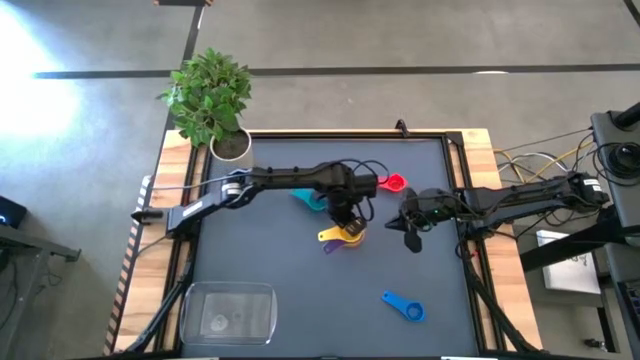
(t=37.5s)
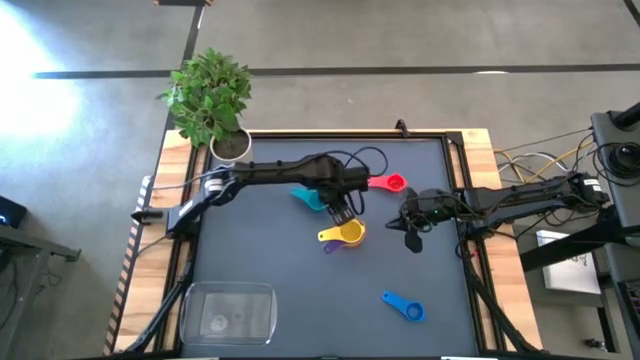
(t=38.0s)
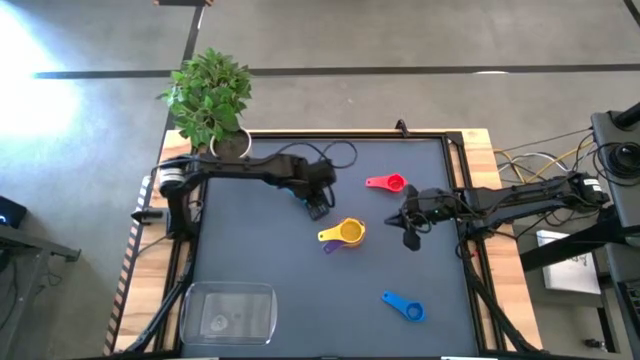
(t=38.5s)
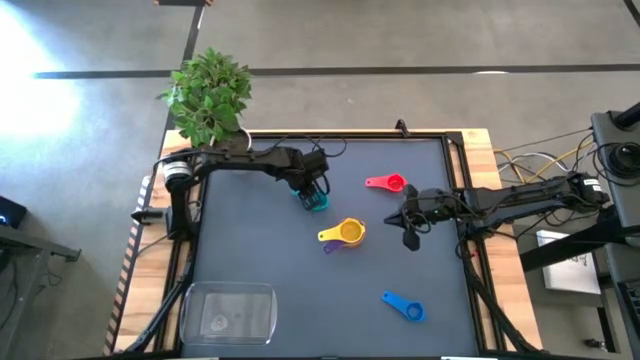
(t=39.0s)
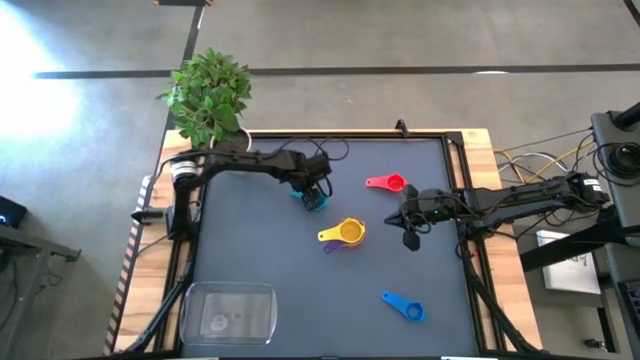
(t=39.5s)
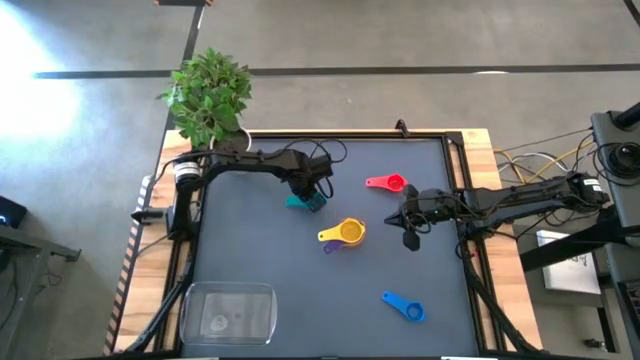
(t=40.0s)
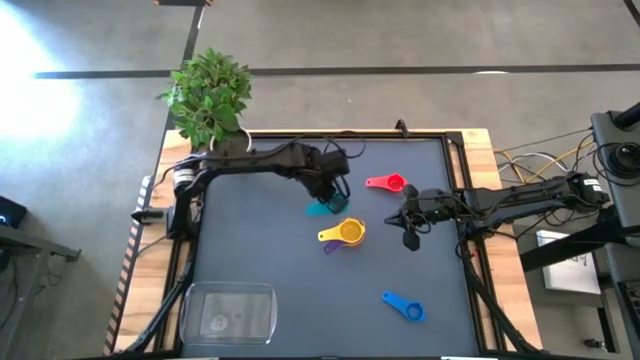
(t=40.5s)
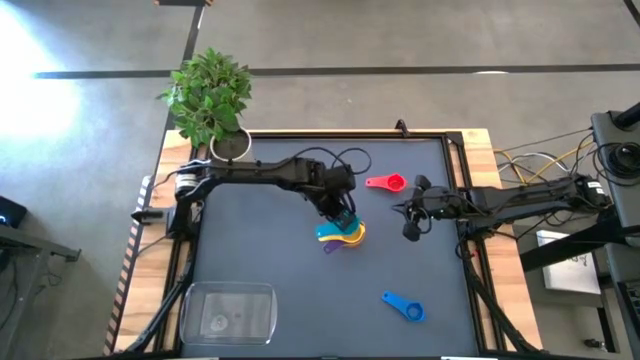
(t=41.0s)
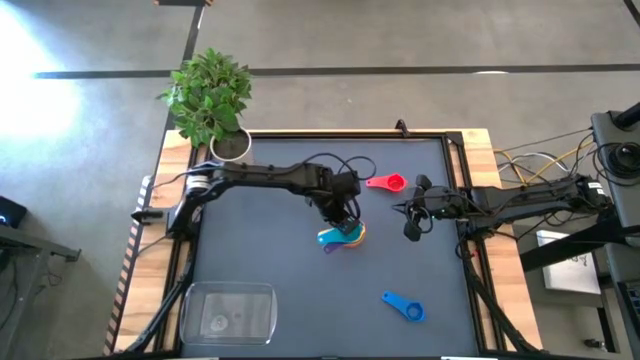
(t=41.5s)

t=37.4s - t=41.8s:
Task: Nest measuring cups in basket
Stack the light blue measuring cup into the yellow measuring cup

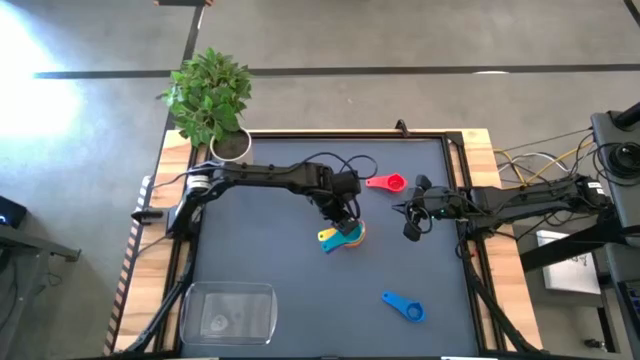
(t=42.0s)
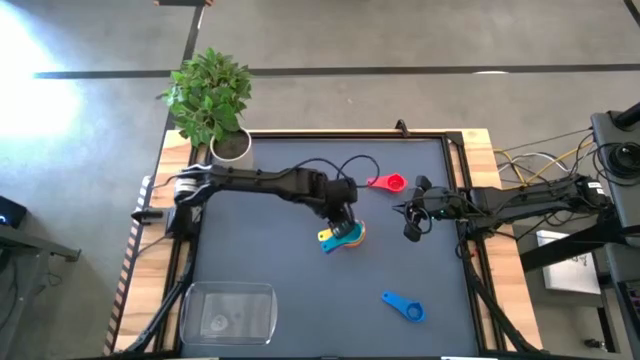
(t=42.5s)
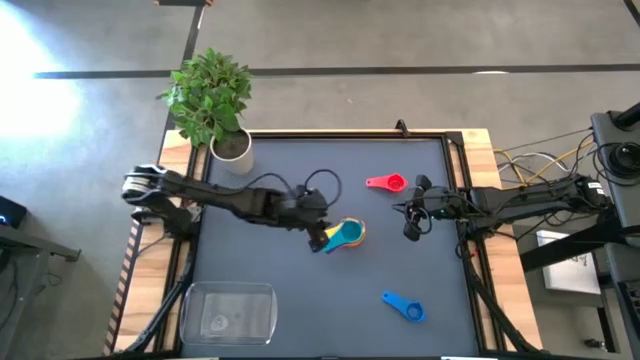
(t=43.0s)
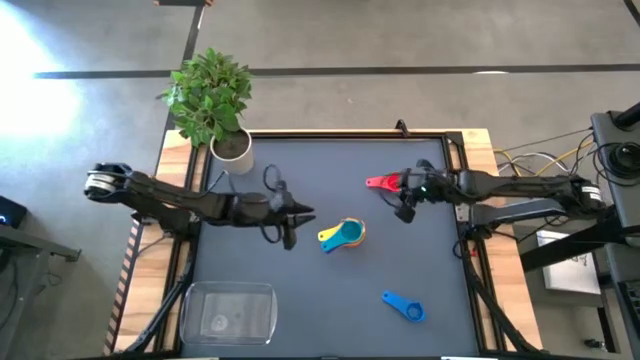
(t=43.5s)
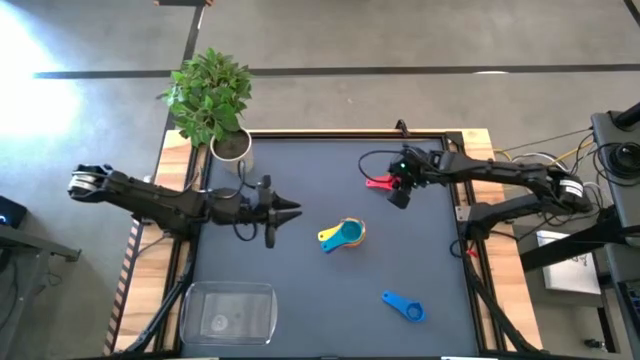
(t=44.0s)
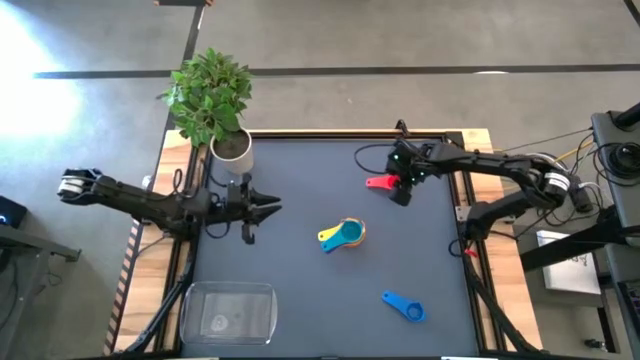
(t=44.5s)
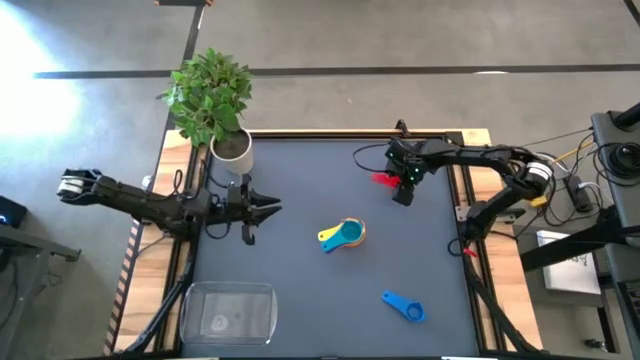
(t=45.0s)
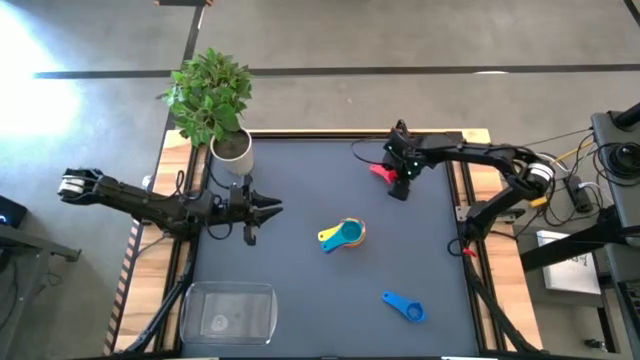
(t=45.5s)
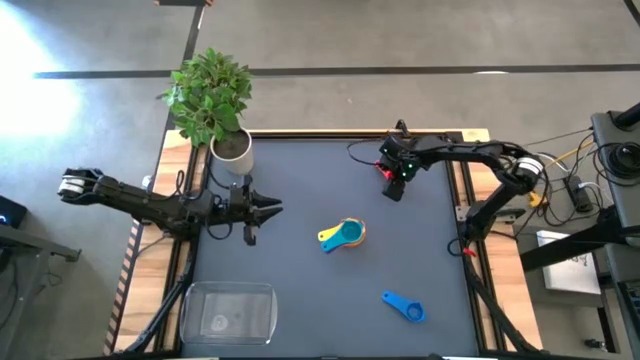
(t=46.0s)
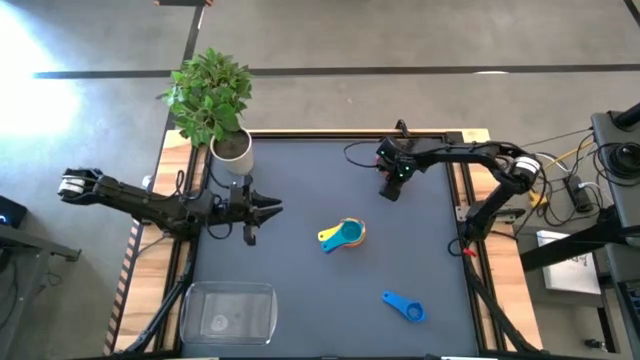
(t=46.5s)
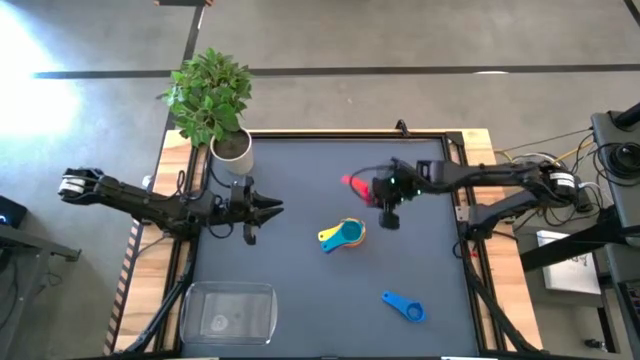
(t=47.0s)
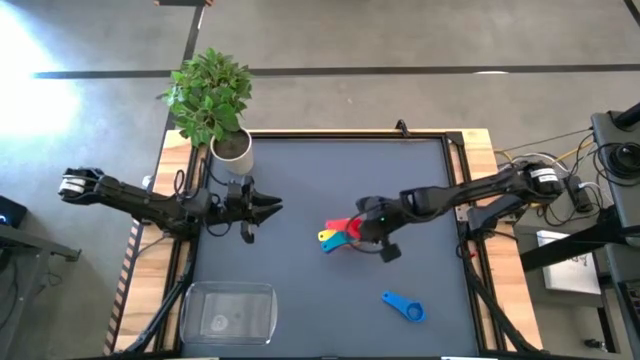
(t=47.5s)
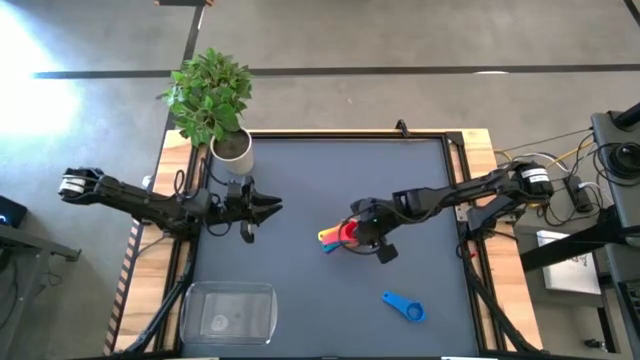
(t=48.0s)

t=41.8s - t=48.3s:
Stack the red measuring cup into the light blue measuring cup

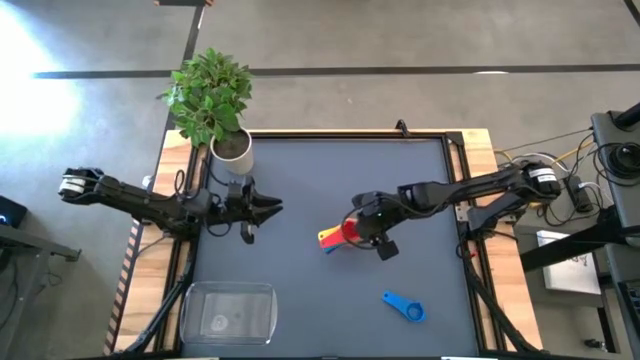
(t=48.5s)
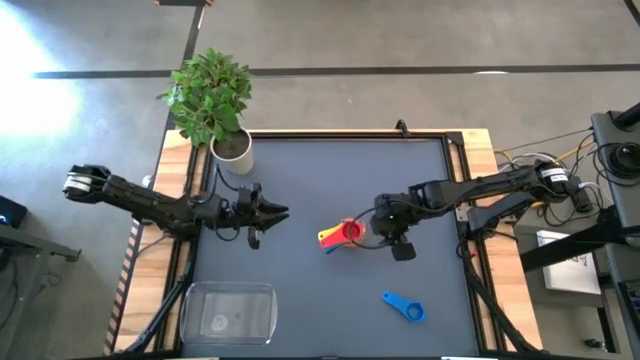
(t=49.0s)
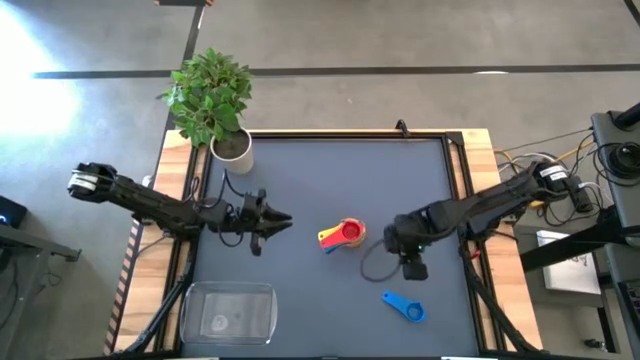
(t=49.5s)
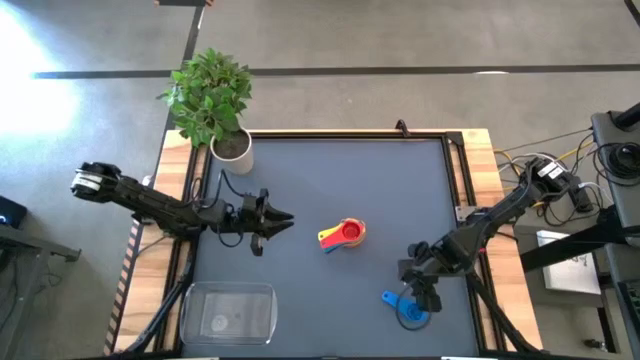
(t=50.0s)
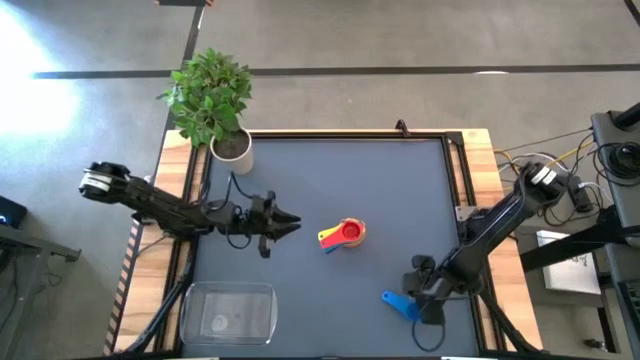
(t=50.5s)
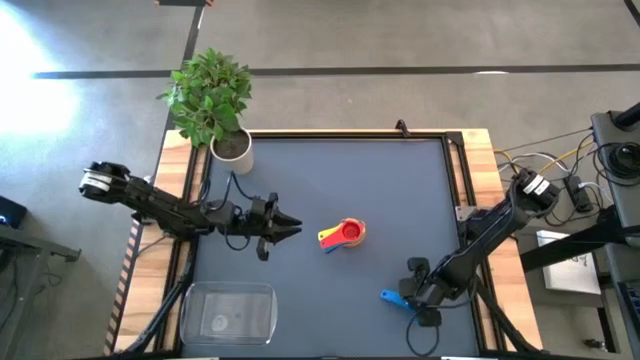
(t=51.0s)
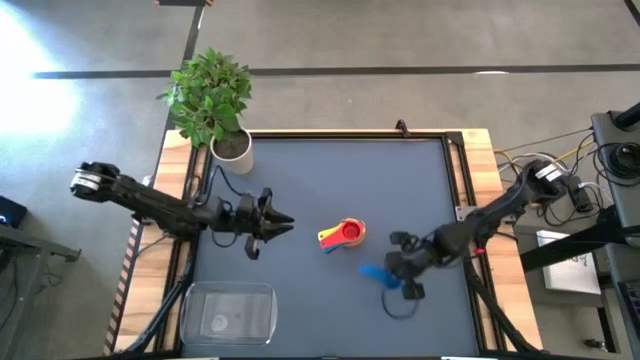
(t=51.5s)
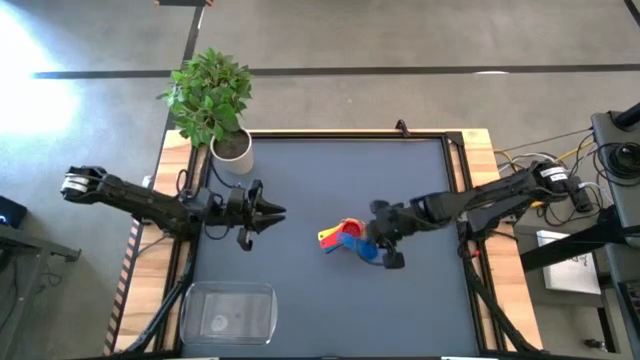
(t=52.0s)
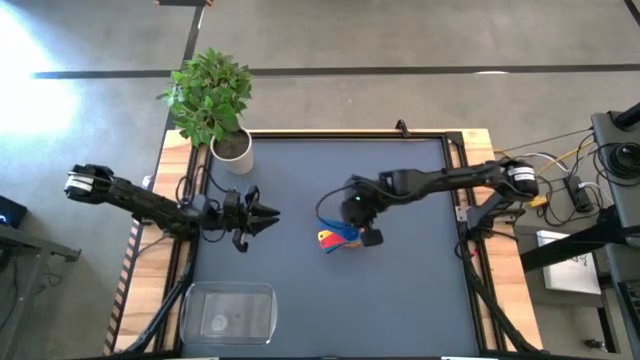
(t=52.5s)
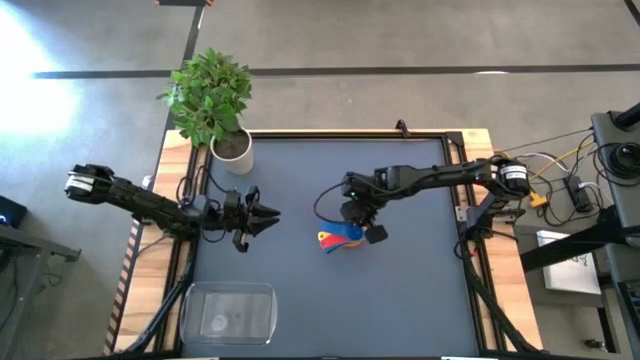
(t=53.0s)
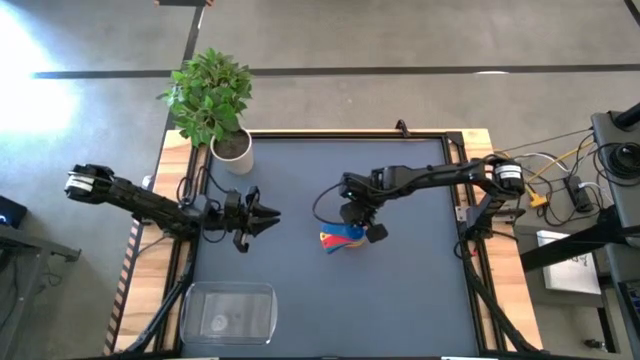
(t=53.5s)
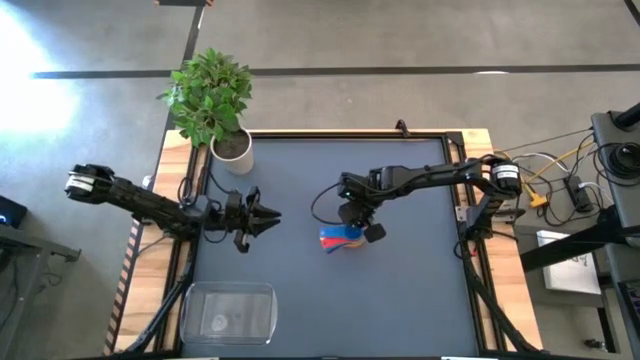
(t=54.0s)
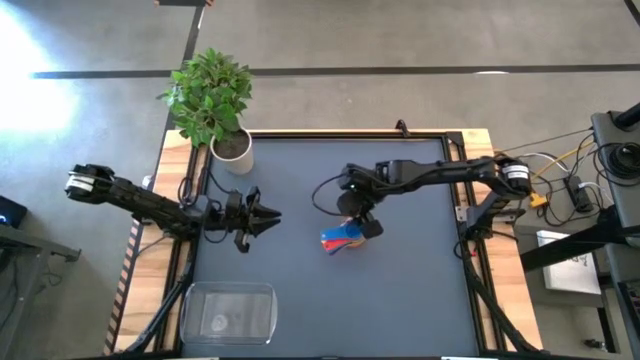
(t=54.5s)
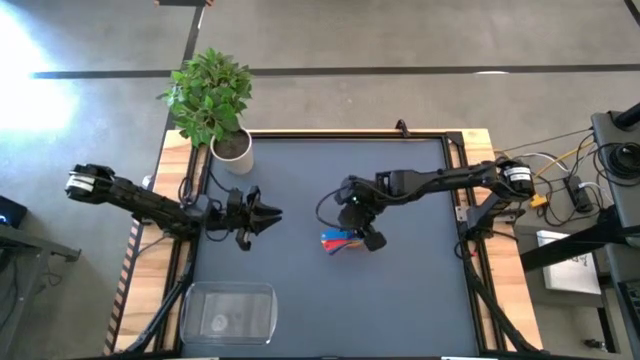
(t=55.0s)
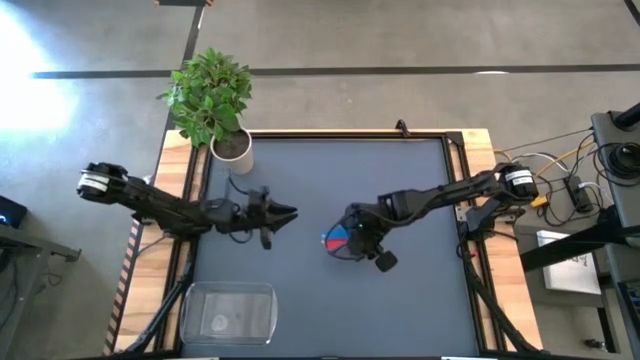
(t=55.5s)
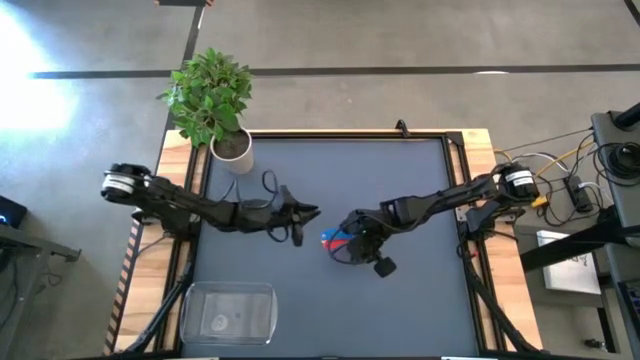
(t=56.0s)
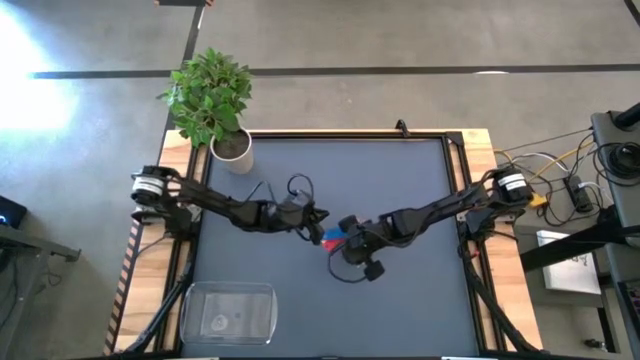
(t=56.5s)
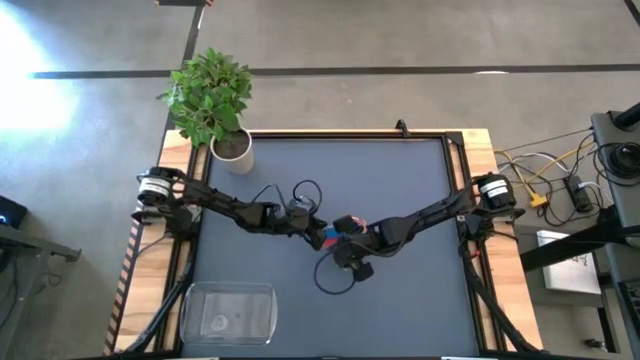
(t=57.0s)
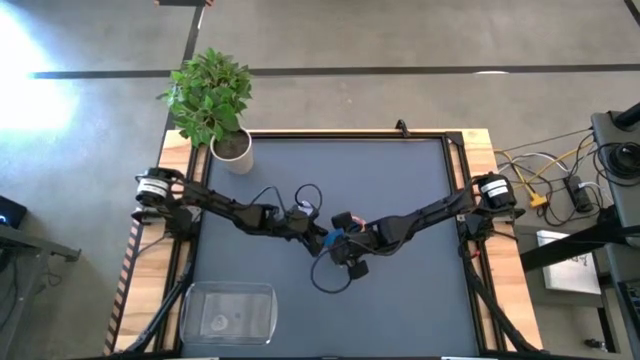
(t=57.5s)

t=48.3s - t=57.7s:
Stack the blue measuring cup into the red measuring cup
